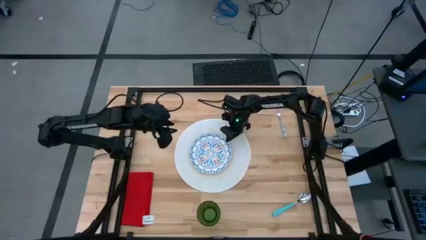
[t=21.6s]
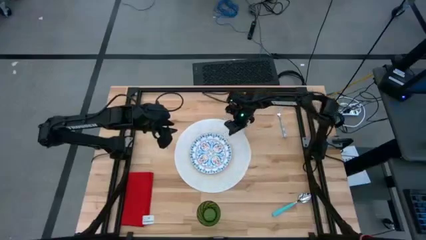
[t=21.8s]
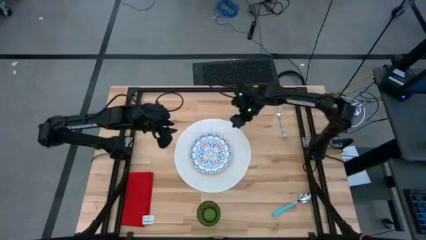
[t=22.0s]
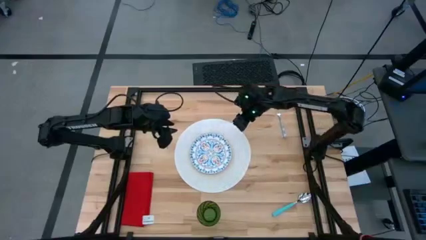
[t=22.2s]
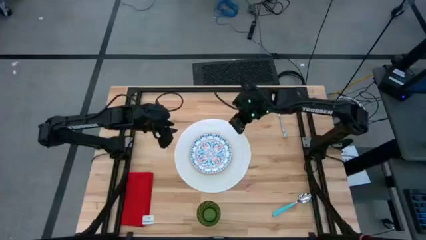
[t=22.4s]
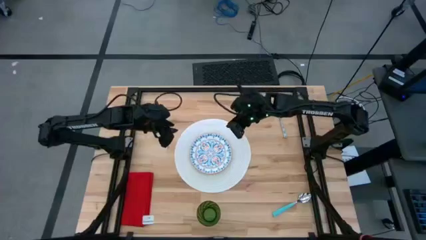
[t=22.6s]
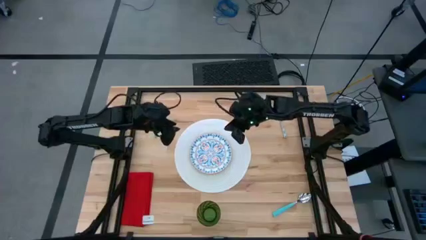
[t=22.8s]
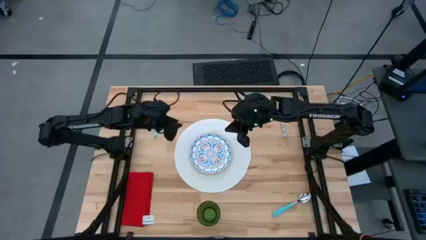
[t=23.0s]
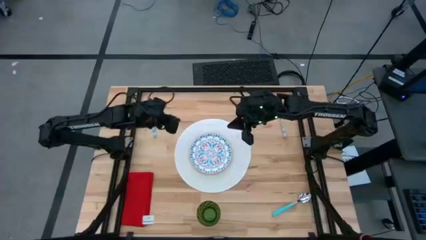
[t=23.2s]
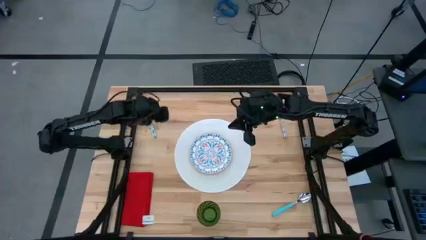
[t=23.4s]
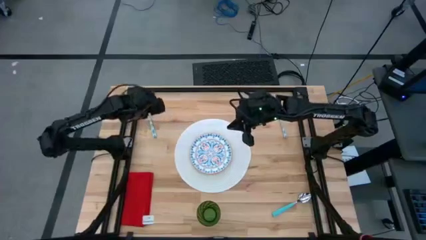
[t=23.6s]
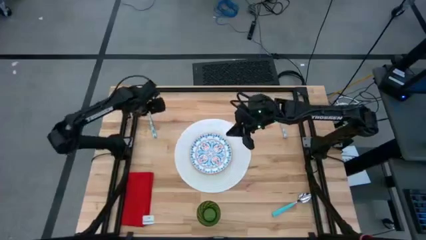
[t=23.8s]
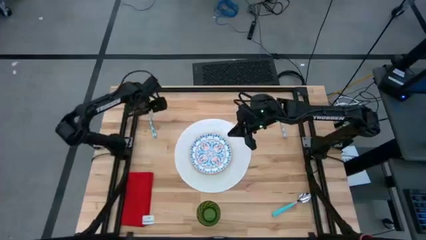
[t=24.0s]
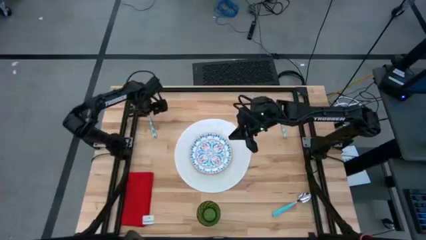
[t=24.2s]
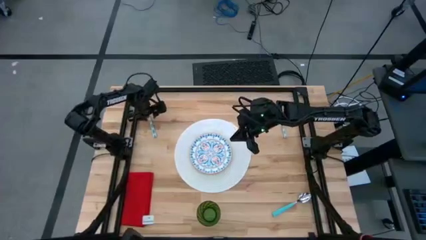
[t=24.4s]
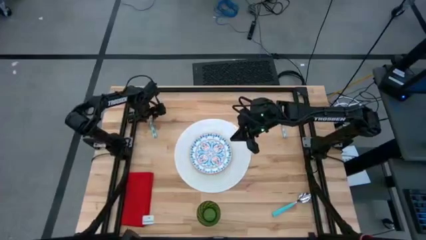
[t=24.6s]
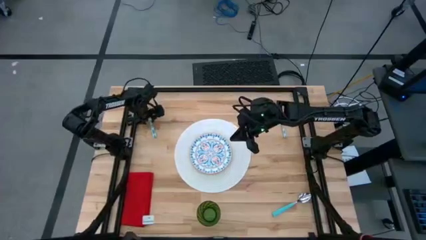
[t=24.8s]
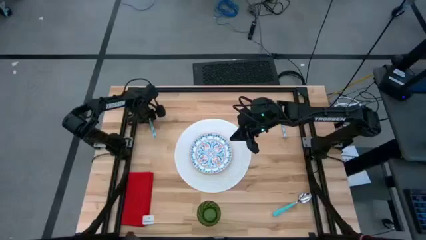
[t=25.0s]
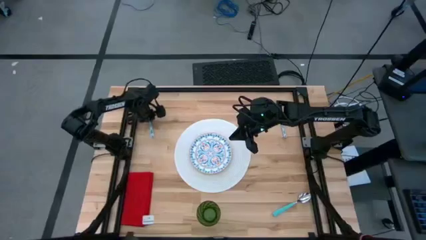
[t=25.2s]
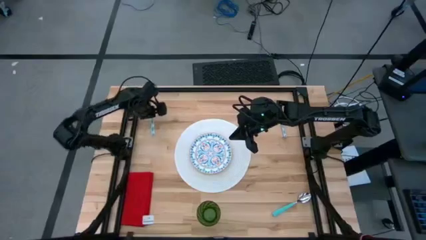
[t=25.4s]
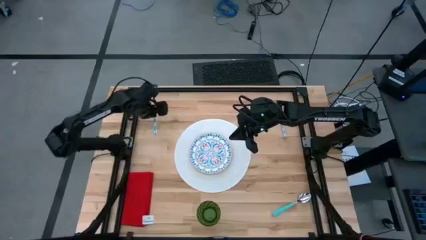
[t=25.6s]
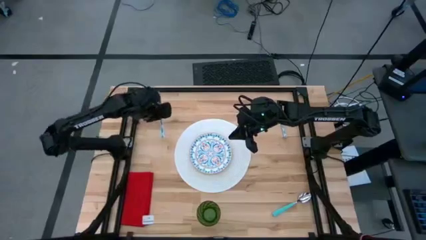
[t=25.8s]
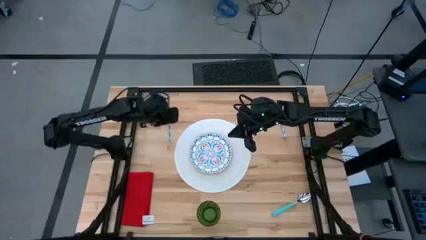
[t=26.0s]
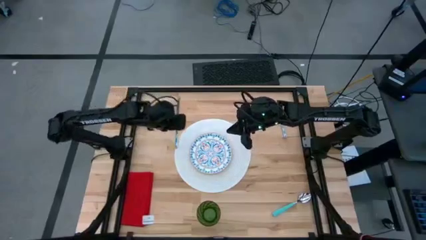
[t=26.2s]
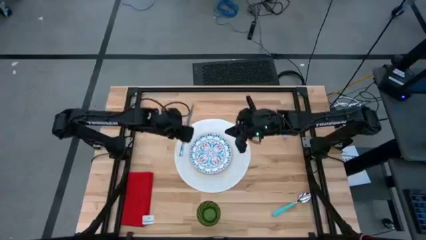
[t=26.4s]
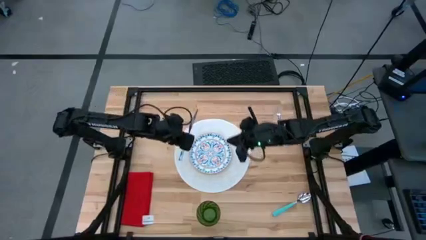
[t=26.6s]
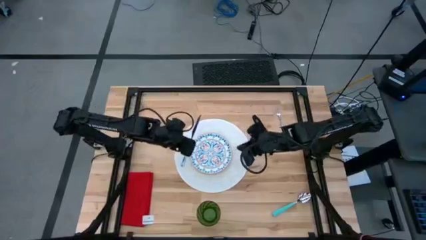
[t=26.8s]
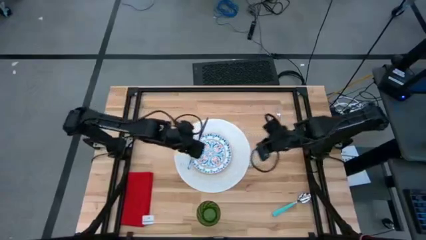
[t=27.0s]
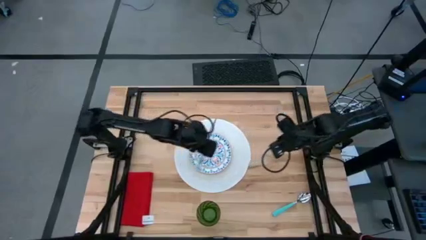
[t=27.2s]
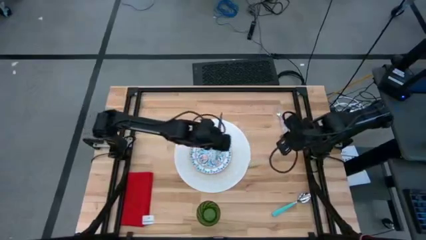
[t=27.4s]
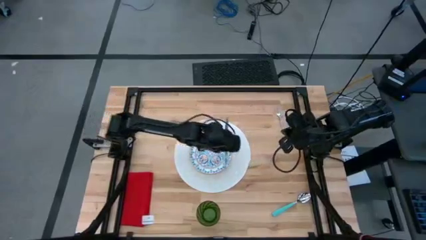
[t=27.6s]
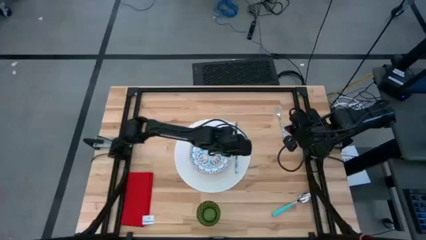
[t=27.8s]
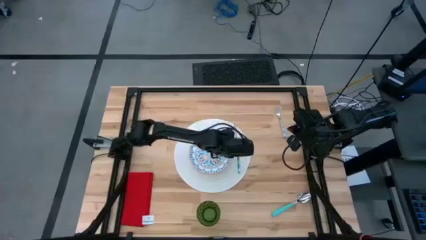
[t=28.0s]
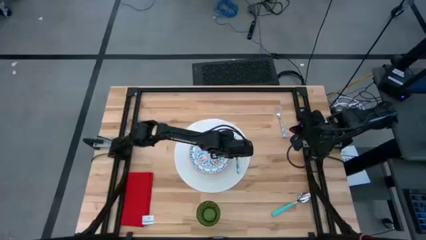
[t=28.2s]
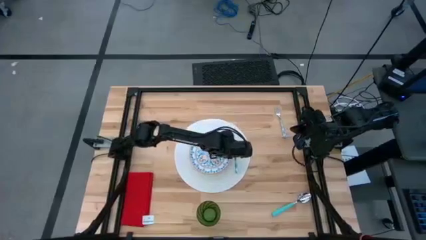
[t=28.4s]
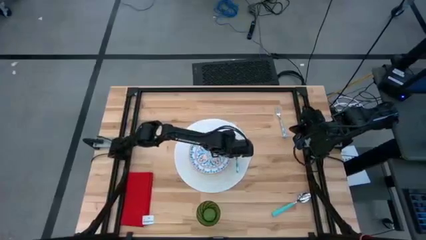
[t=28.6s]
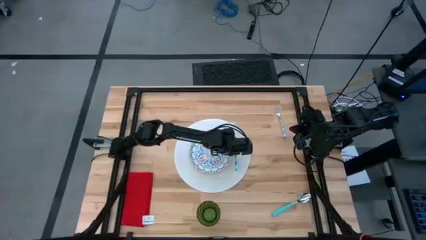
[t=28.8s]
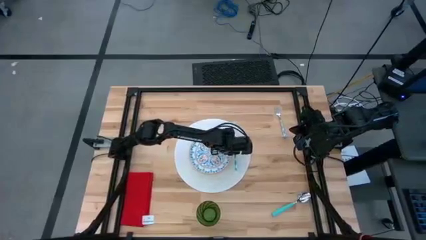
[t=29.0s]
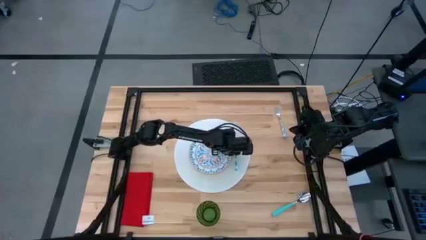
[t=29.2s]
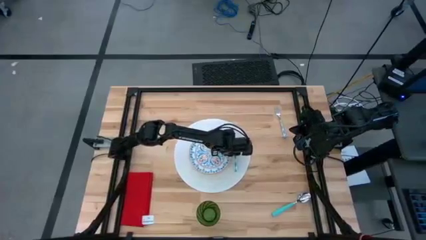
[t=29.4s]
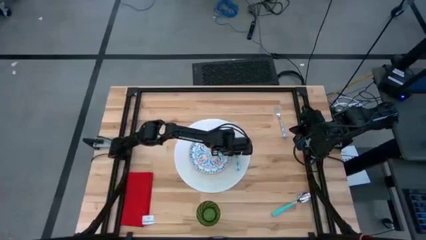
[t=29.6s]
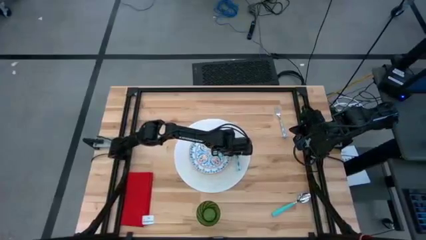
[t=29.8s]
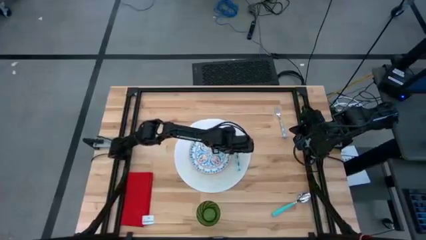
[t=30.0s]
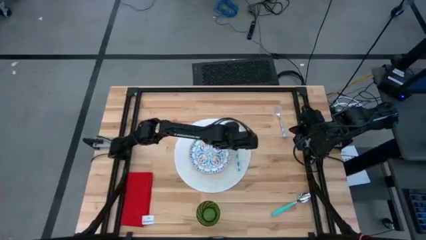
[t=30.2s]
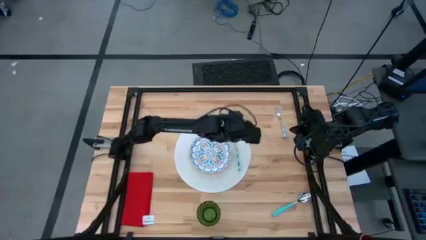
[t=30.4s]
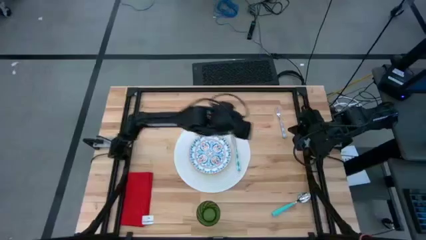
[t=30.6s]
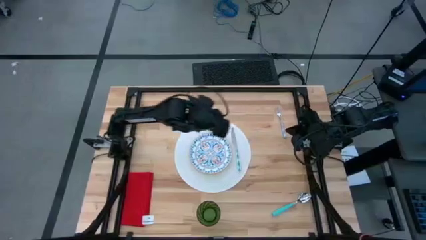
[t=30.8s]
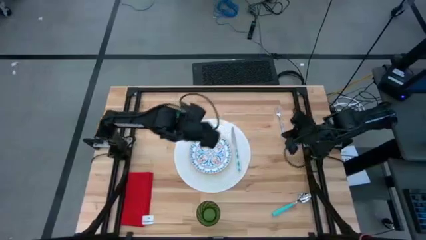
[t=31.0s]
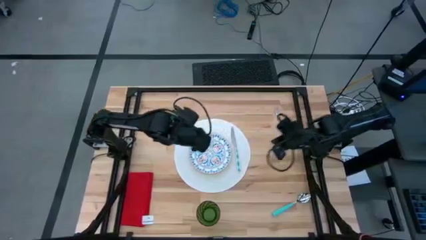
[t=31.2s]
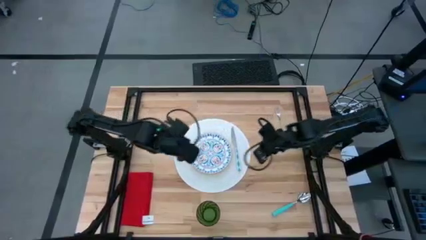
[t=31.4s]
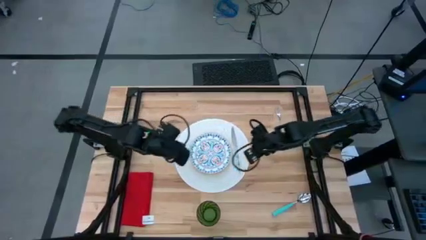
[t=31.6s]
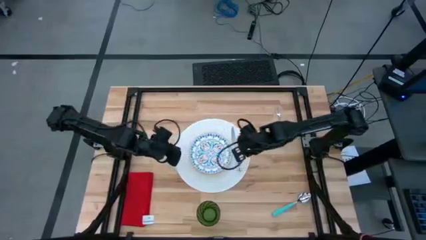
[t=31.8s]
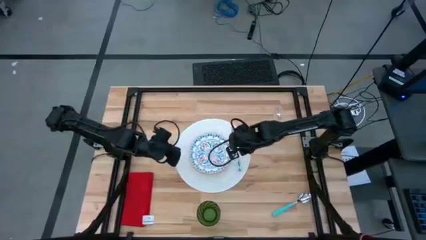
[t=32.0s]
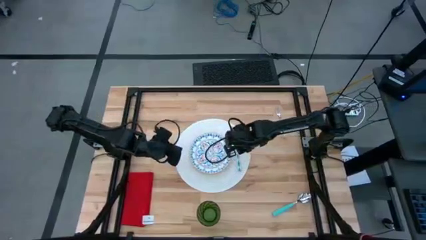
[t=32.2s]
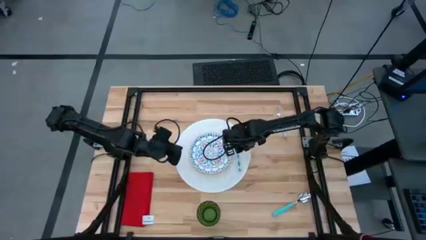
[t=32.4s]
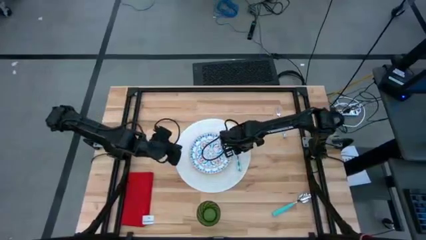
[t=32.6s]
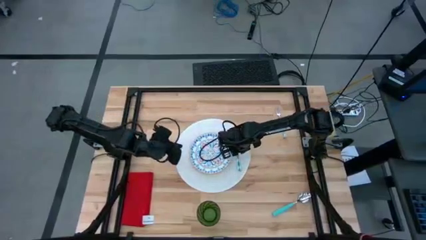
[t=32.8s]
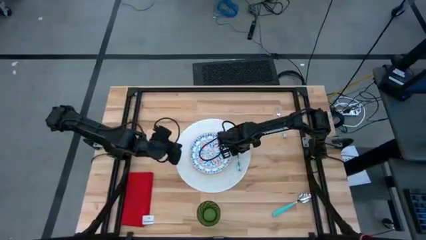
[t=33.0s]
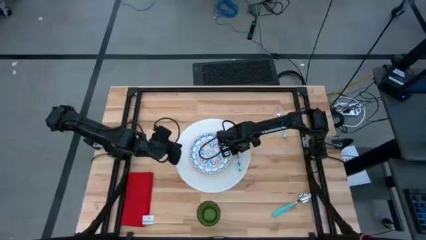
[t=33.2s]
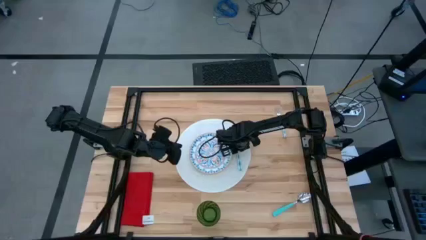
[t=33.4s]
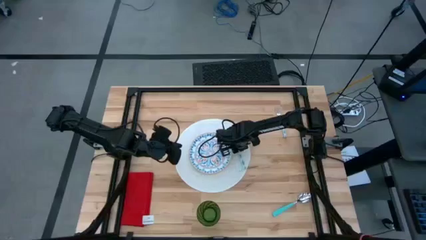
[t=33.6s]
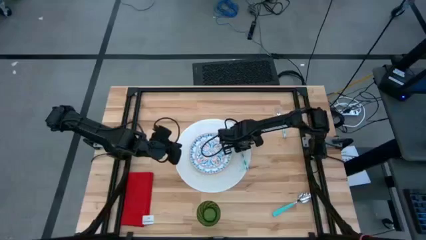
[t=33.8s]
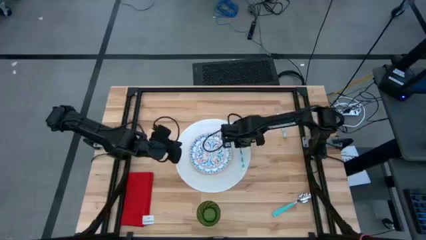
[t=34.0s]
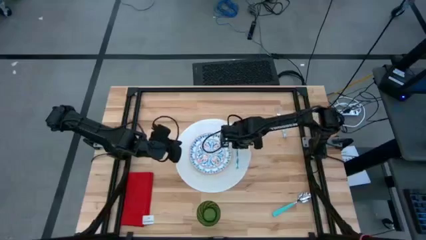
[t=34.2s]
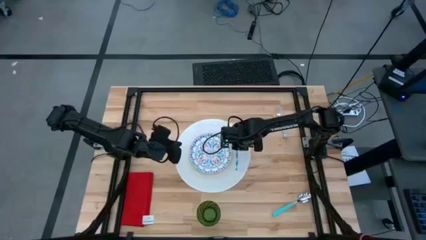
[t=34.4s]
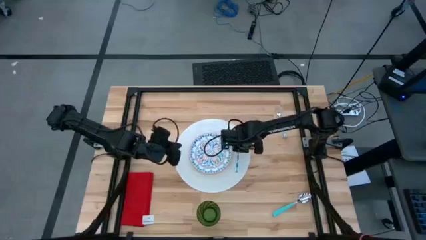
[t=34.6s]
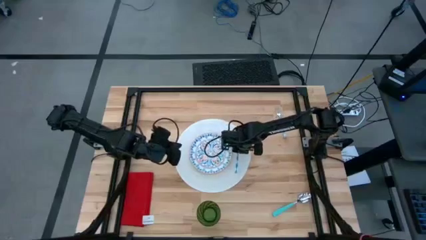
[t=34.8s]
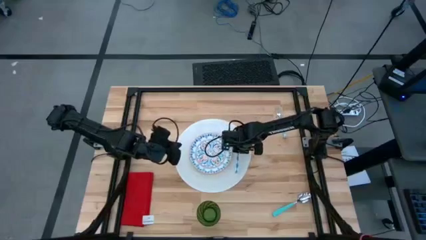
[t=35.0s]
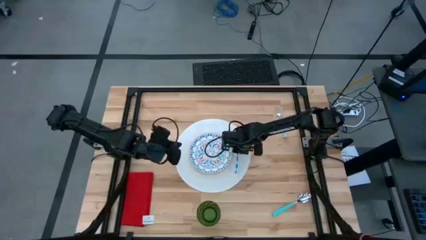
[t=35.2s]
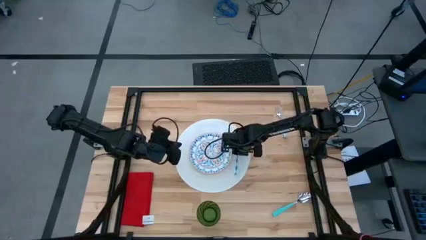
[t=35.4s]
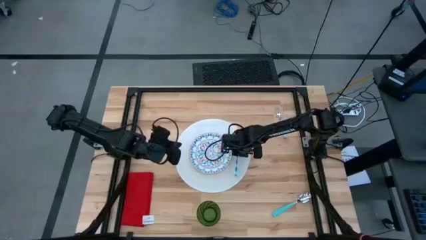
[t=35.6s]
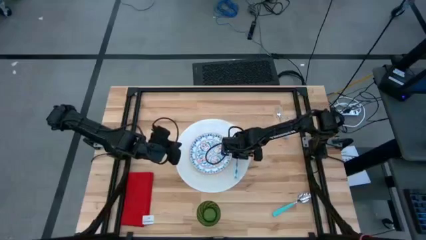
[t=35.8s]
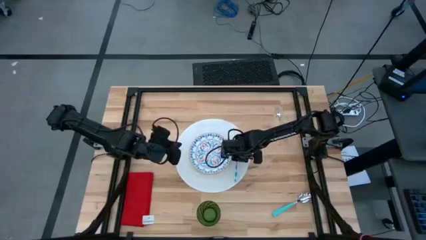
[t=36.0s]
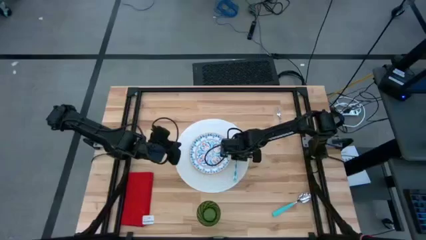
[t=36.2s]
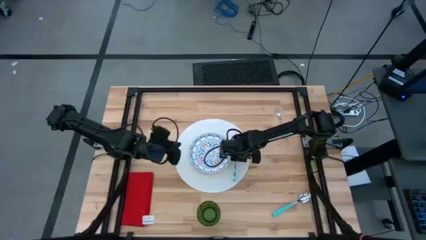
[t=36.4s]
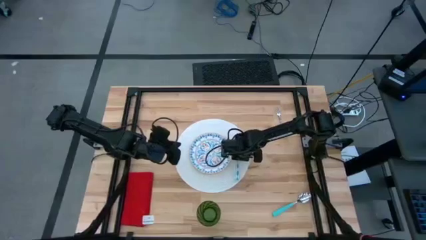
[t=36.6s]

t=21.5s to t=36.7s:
Task: Set table place
Put the white table knife to the right side of the blue patterned plate on the white tablemat
